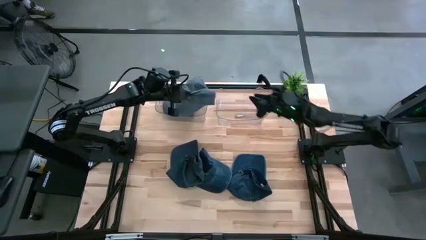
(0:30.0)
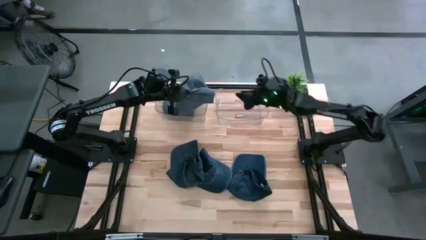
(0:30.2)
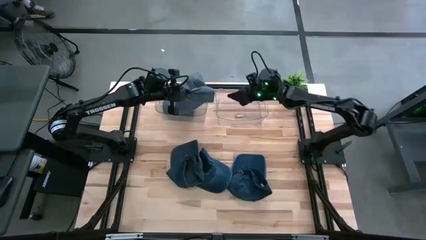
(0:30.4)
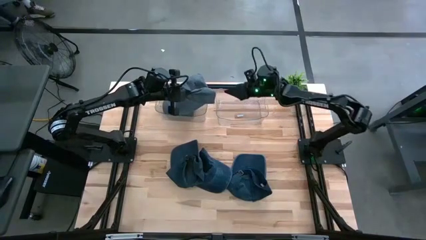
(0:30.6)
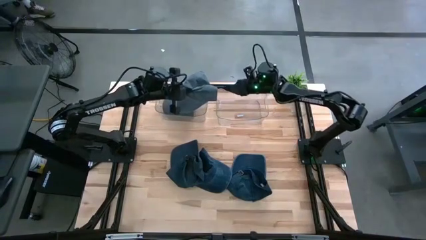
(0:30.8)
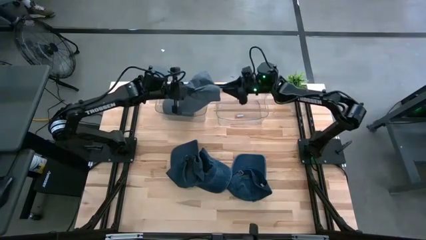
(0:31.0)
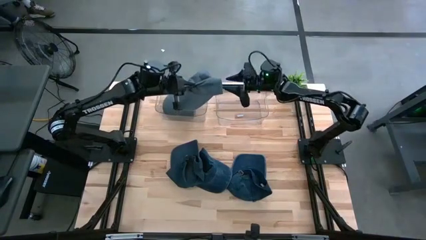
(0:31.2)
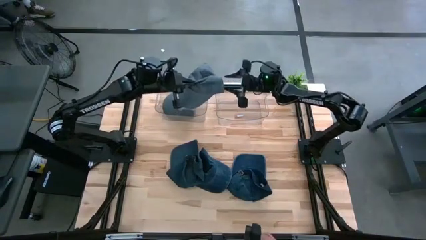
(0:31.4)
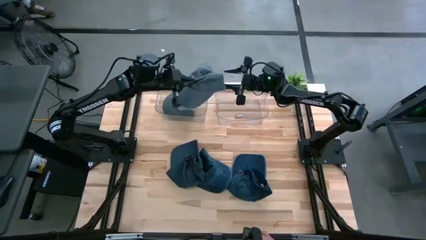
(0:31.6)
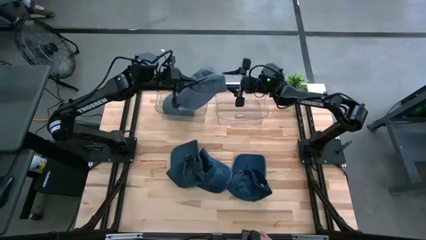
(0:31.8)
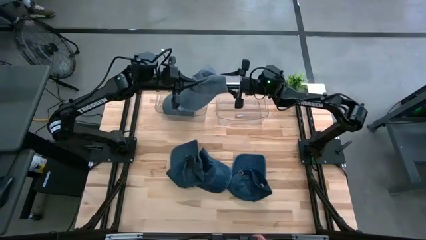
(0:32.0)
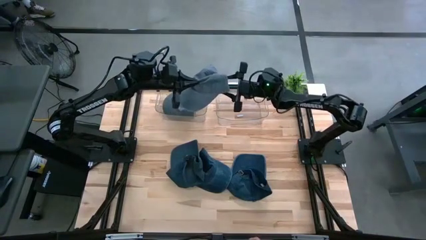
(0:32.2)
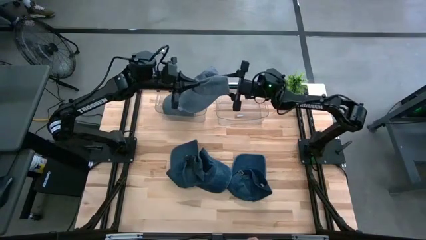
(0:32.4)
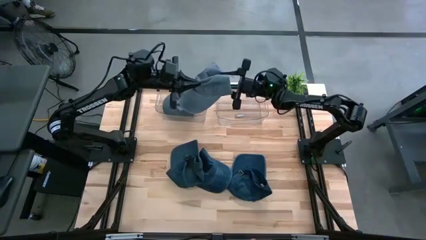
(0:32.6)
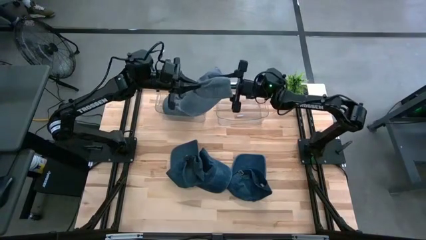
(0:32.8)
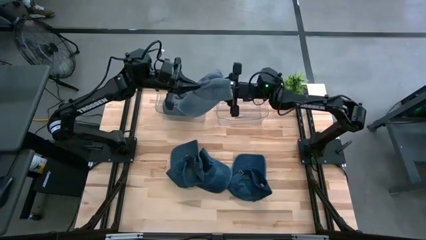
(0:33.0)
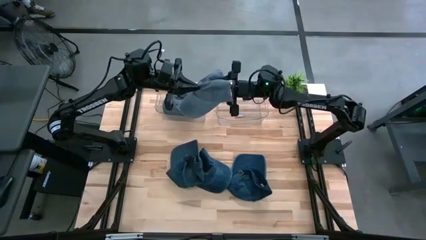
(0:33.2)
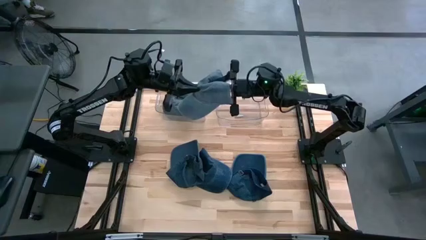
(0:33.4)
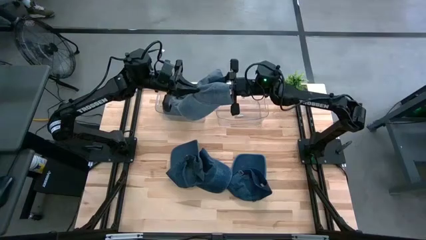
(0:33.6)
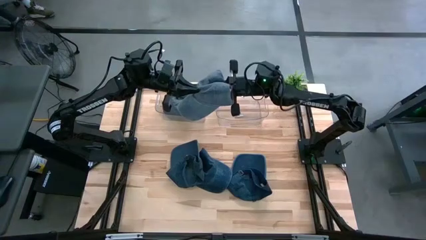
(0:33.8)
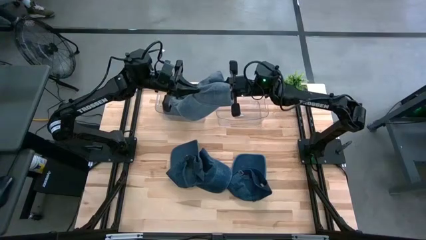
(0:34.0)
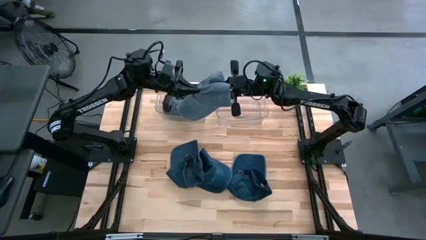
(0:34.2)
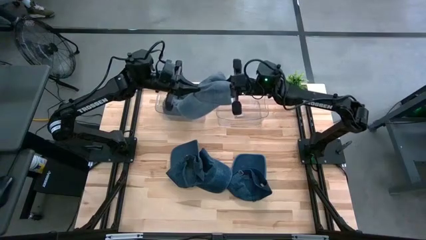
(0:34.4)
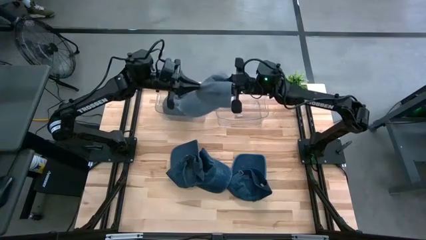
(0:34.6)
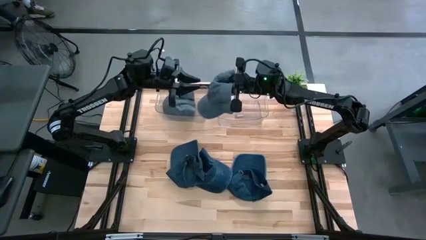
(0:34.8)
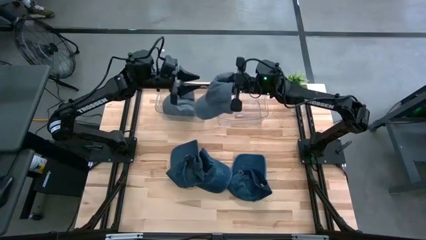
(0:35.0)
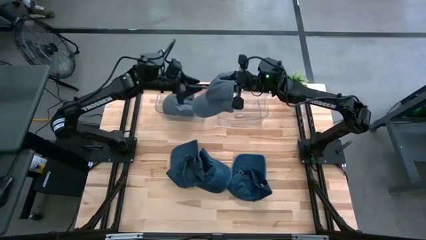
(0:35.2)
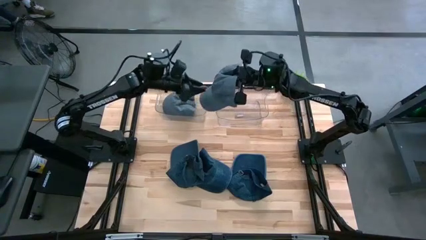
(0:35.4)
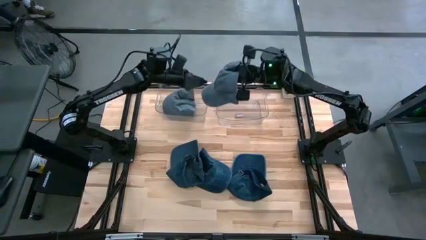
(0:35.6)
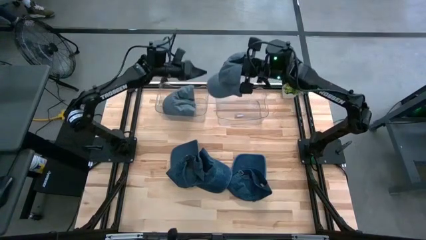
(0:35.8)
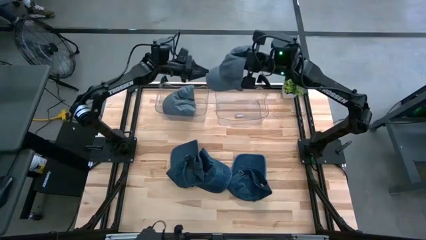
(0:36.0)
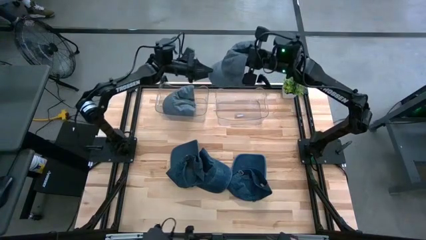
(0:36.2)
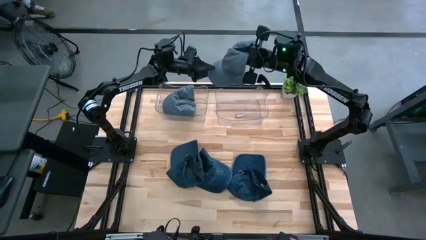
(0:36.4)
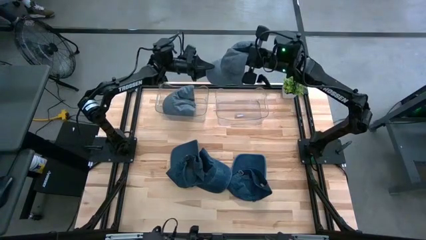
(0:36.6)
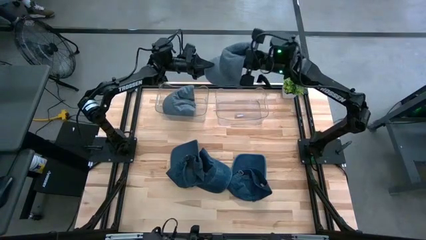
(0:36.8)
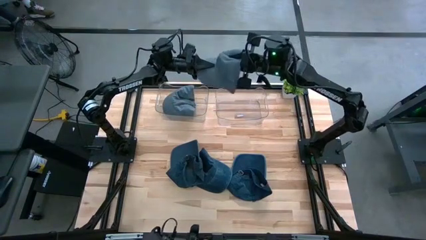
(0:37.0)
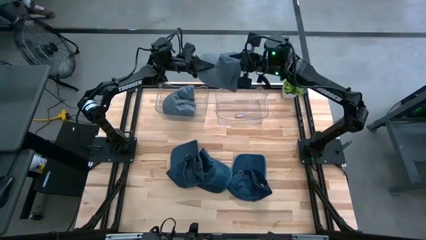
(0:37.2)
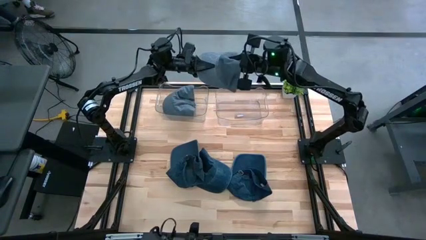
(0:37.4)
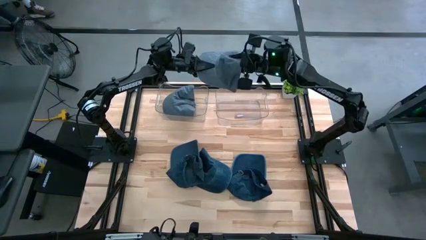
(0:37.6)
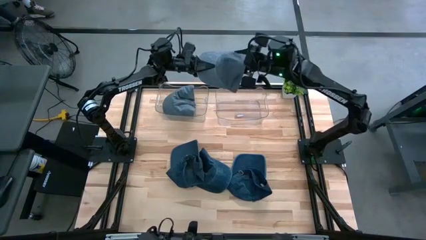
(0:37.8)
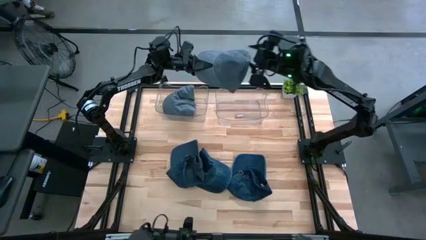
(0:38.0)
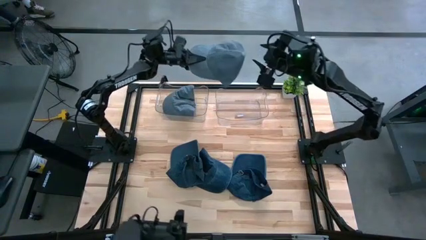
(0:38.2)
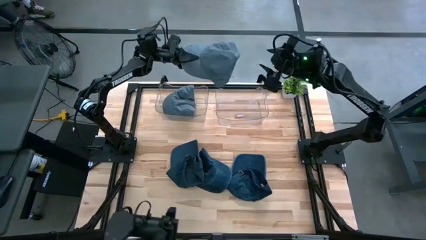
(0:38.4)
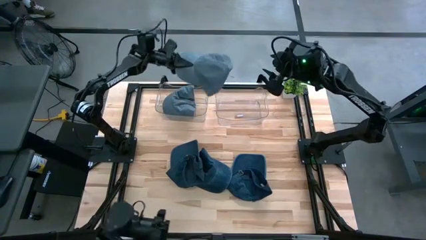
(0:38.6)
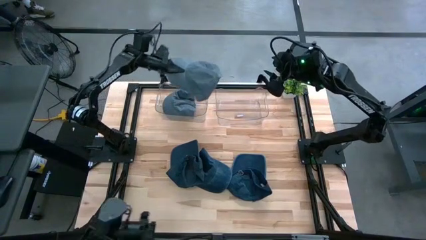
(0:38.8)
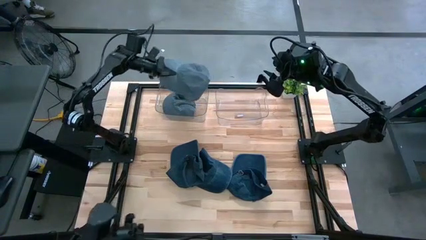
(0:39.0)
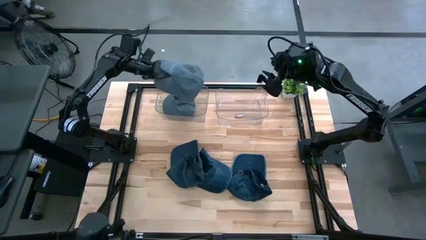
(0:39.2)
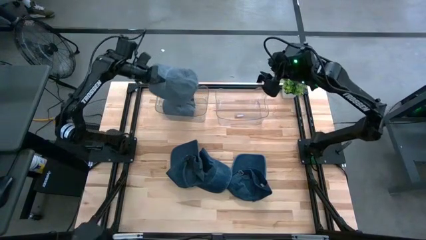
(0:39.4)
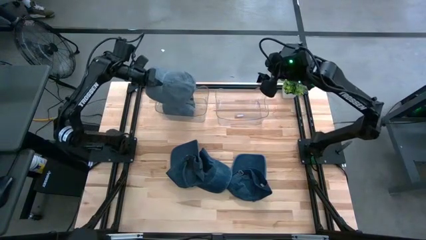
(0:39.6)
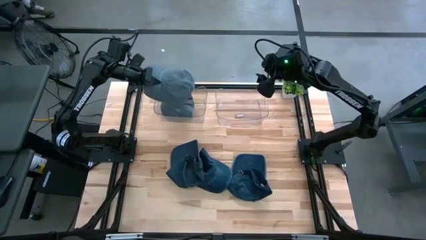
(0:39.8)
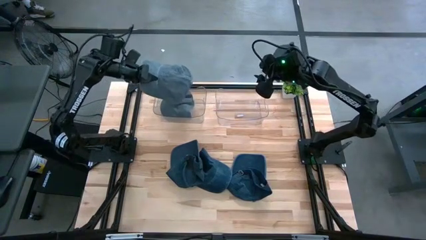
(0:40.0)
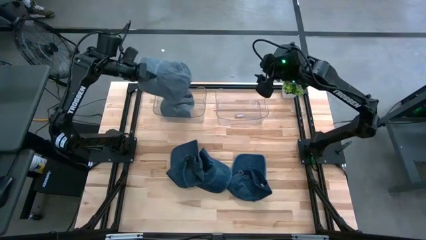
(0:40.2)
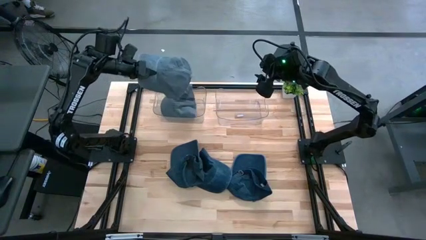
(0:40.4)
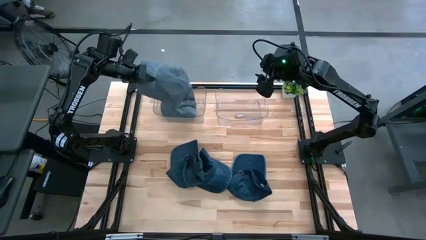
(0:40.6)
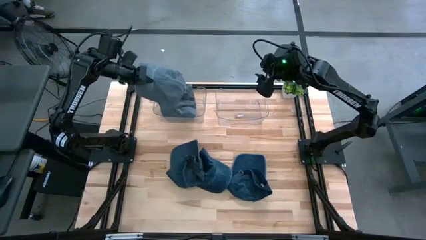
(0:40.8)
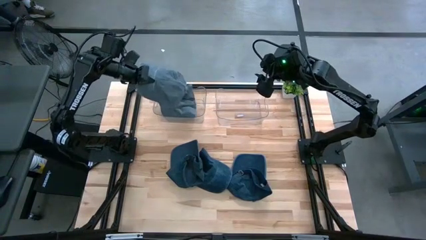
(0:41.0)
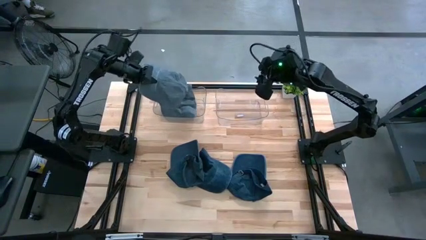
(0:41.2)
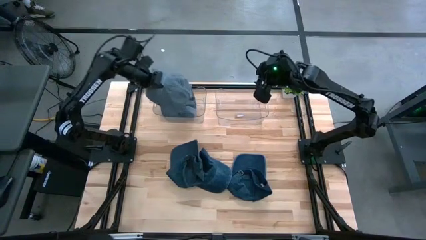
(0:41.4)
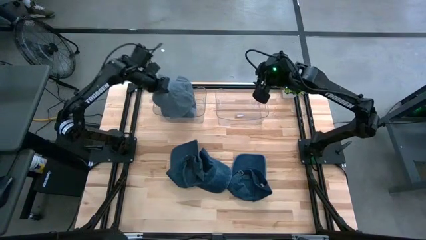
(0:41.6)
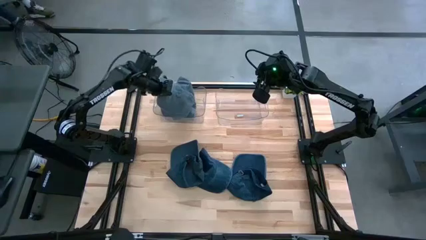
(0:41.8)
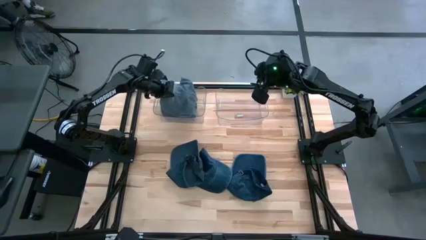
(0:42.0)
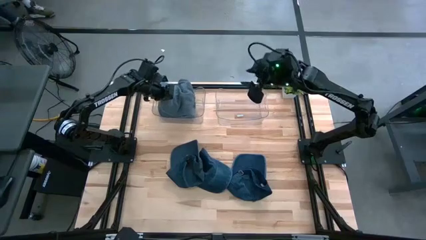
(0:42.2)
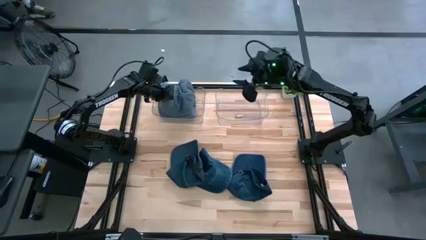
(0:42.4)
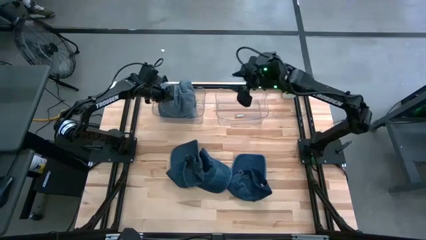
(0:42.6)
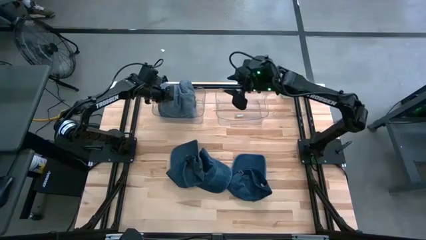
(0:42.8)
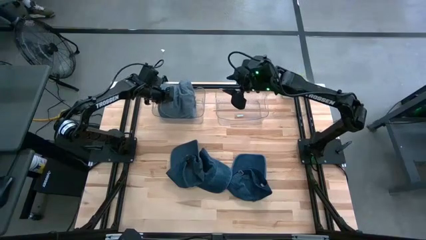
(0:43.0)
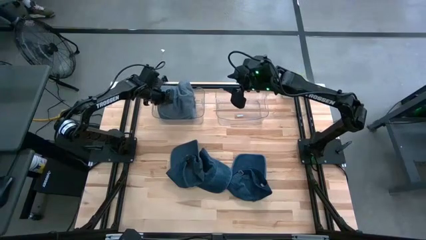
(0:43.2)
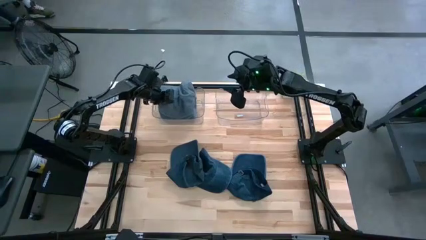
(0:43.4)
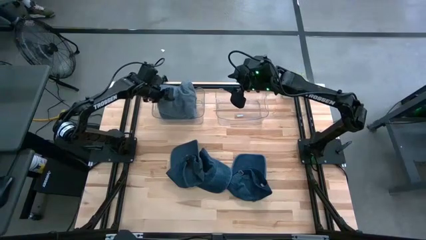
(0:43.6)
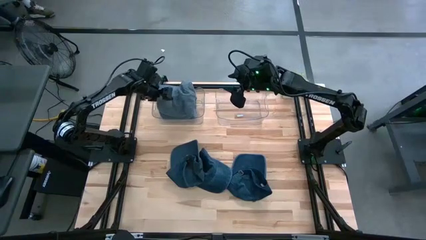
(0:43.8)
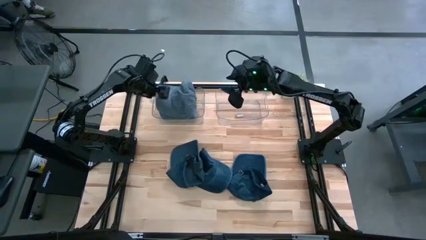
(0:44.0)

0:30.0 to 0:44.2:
Task: Pick & Place hat
Put the gray cap into the left transparent bin

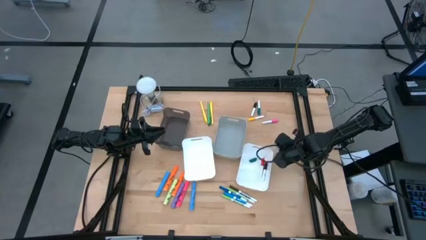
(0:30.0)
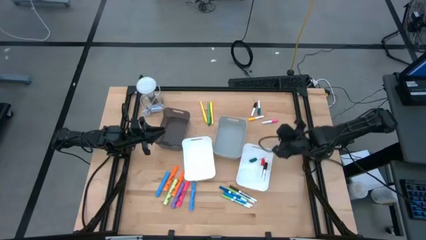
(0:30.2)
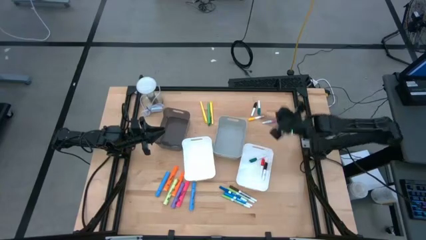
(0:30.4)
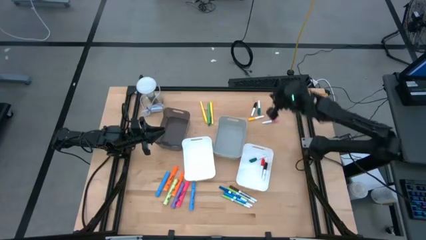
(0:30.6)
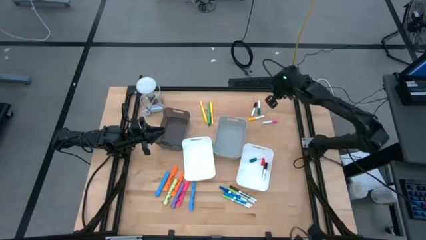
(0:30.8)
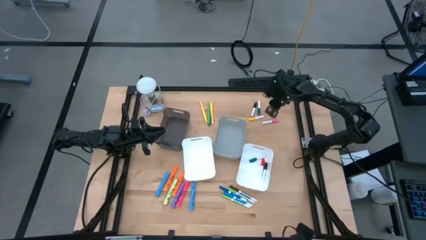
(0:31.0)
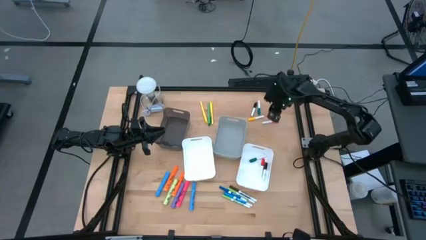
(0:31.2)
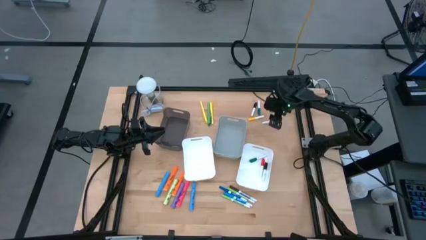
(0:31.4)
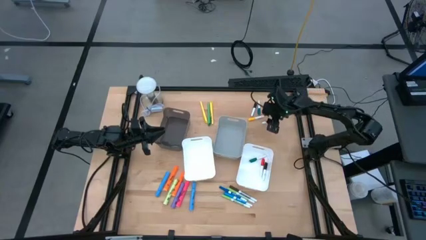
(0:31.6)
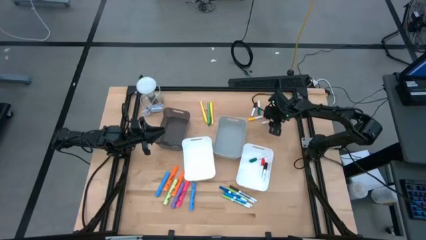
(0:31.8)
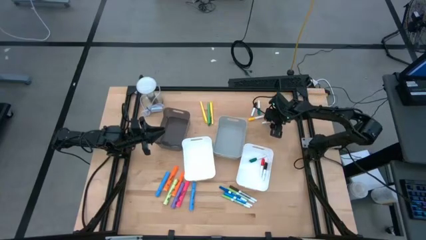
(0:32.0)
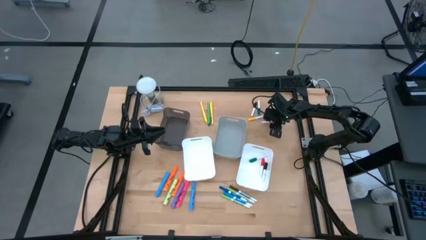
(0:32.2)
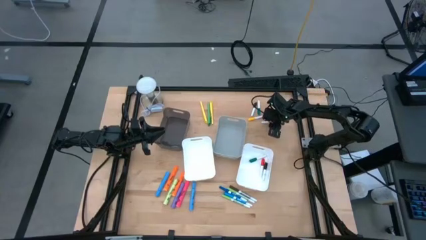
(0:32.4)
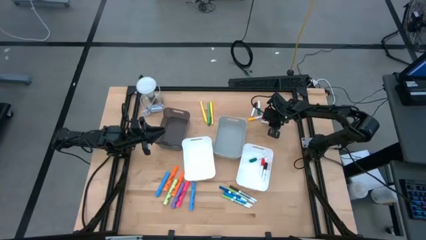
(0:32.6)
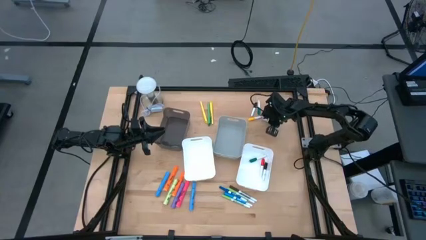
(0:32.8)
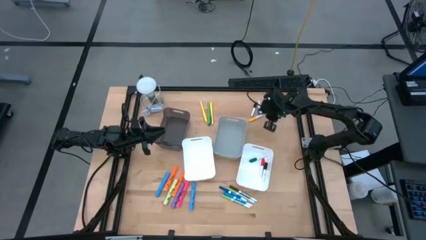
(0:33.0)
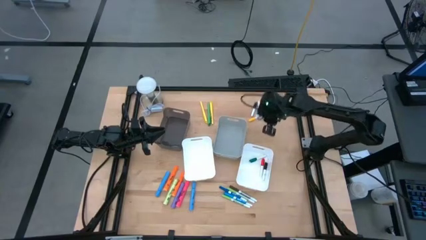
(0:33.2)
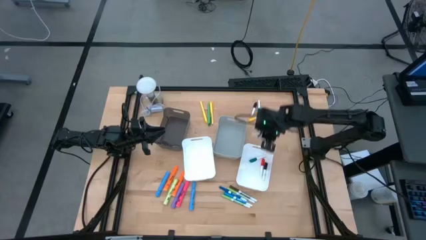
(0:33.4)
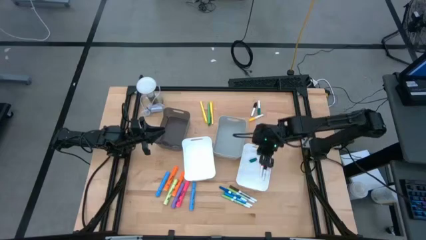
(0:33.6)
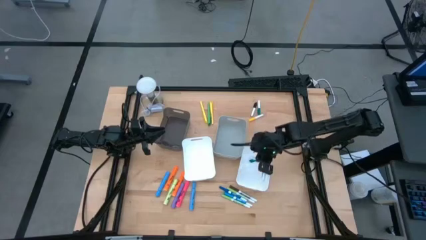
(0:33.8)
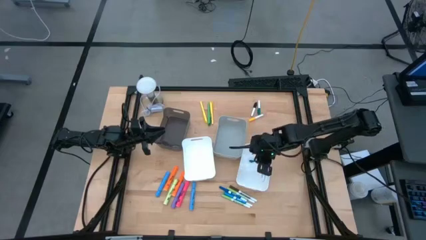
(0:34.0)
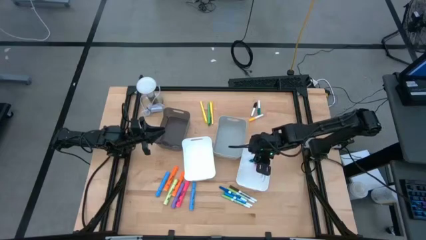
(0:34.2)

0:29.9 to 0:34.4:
Task: Pick & Place Markers
Put the pink mini marker into the right white bin
